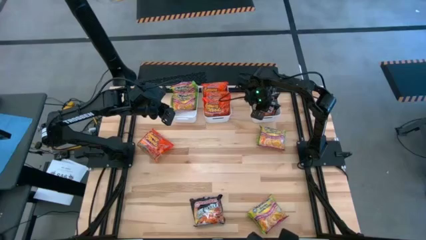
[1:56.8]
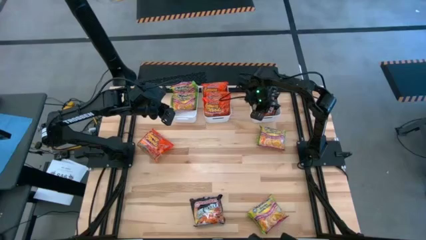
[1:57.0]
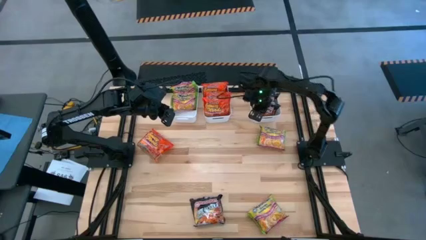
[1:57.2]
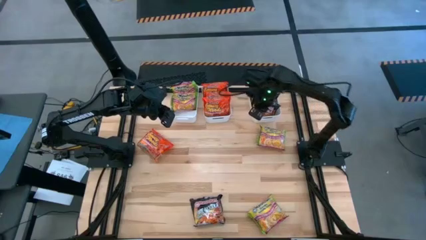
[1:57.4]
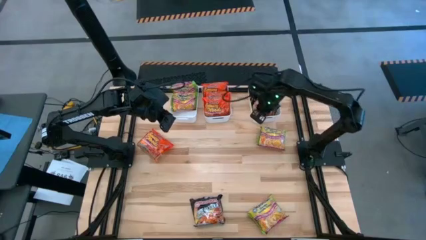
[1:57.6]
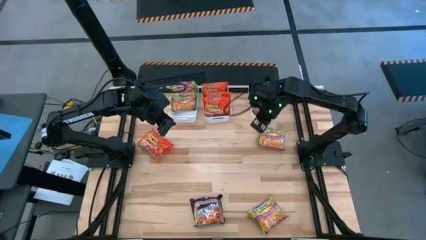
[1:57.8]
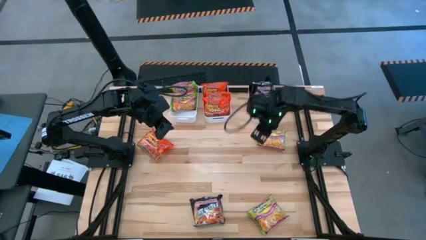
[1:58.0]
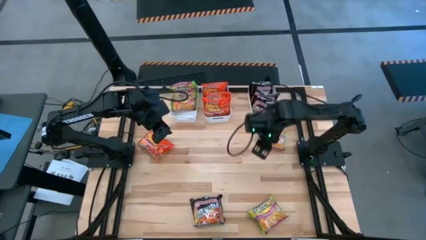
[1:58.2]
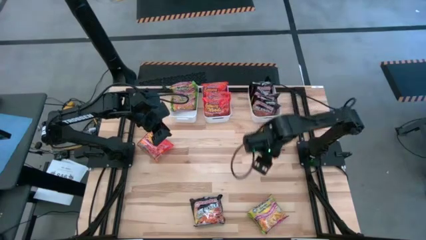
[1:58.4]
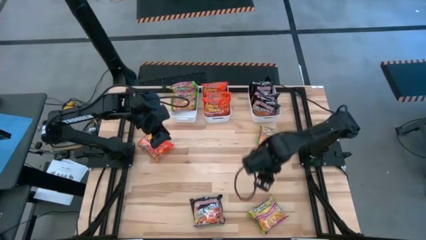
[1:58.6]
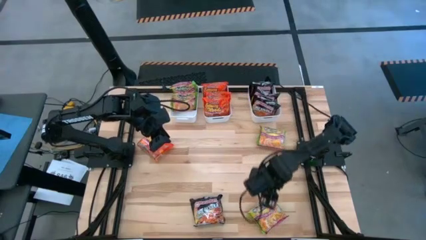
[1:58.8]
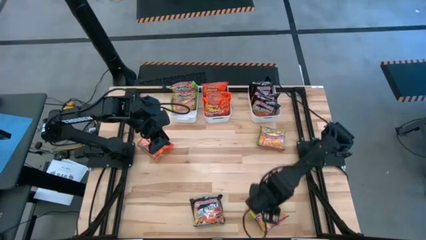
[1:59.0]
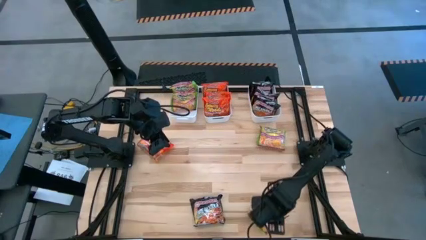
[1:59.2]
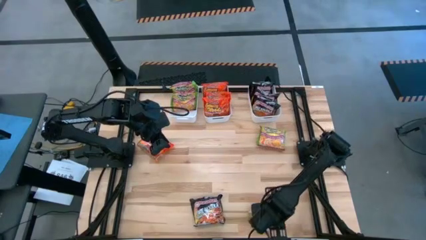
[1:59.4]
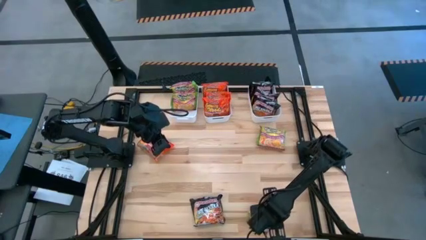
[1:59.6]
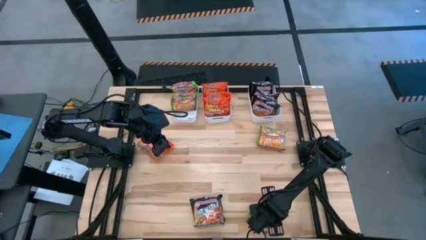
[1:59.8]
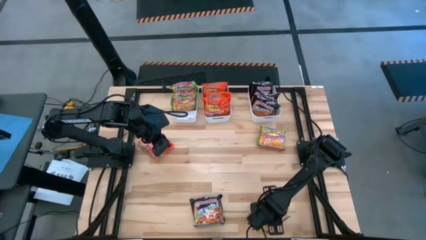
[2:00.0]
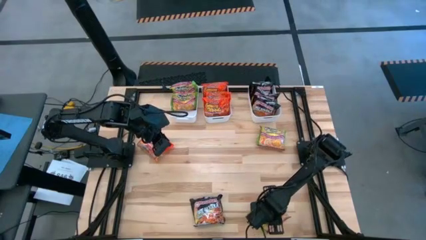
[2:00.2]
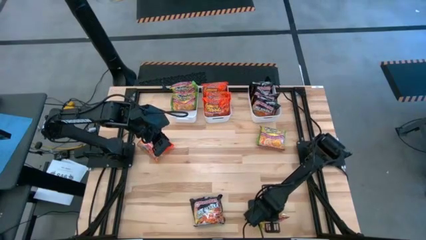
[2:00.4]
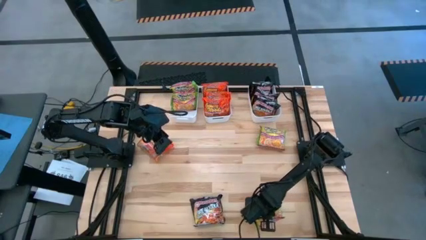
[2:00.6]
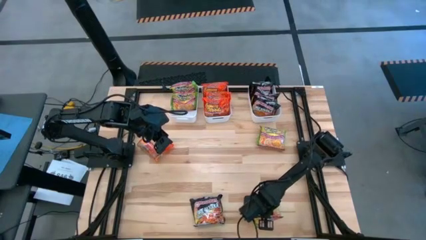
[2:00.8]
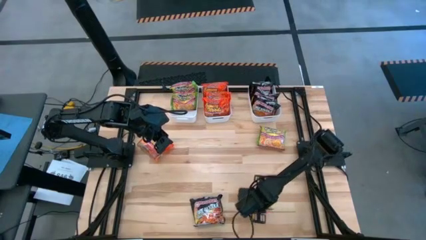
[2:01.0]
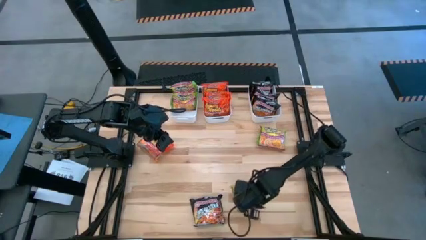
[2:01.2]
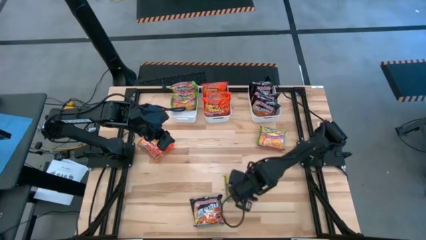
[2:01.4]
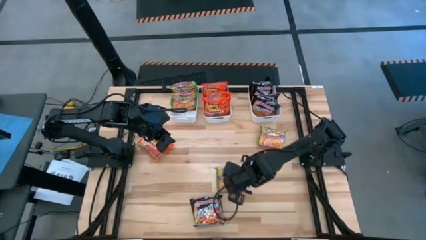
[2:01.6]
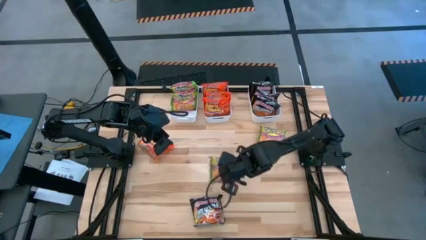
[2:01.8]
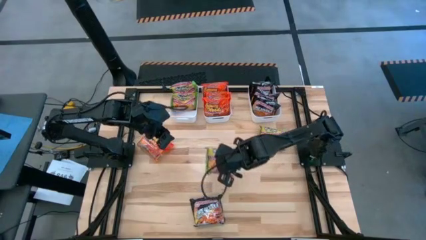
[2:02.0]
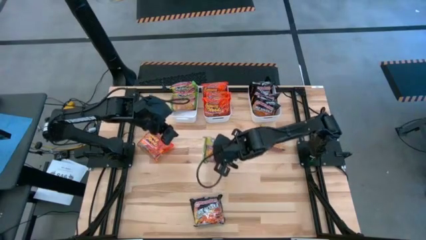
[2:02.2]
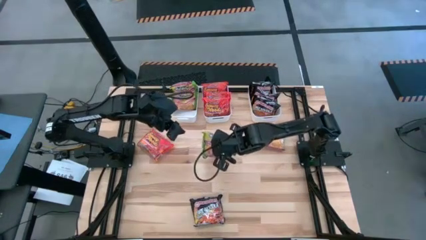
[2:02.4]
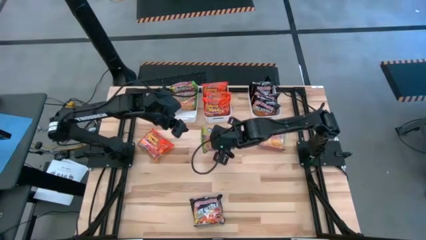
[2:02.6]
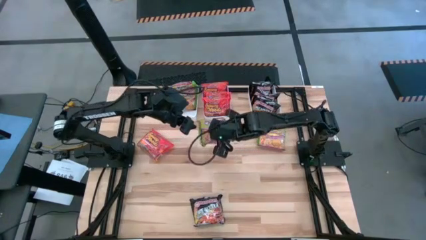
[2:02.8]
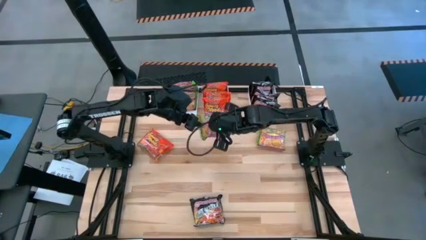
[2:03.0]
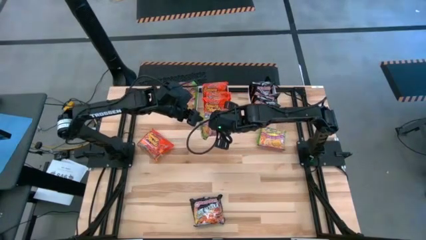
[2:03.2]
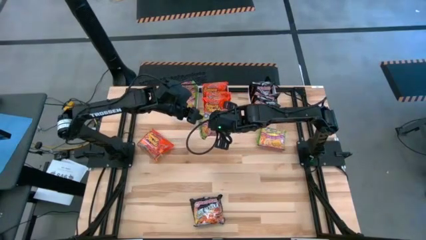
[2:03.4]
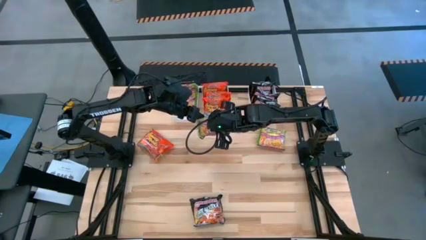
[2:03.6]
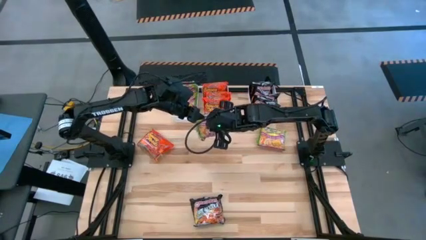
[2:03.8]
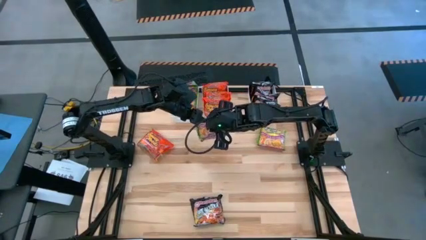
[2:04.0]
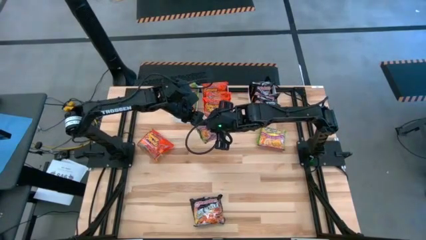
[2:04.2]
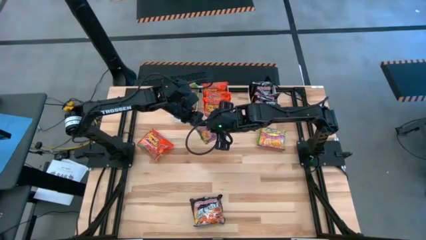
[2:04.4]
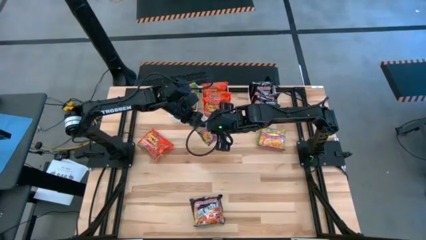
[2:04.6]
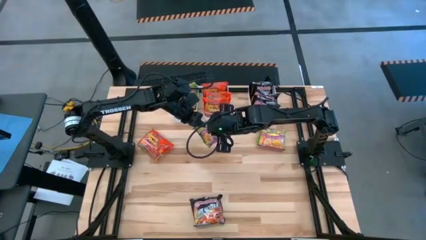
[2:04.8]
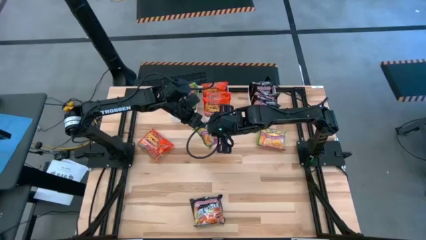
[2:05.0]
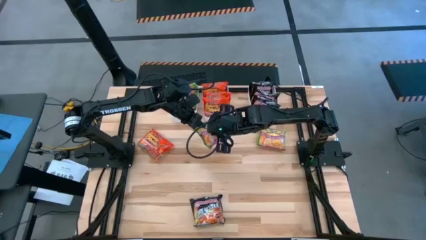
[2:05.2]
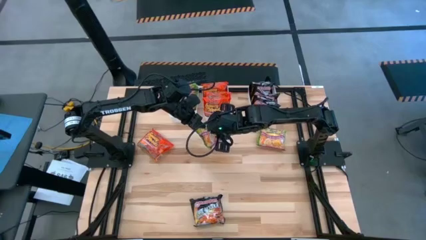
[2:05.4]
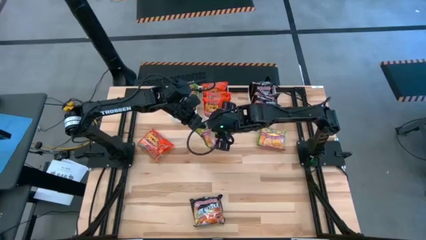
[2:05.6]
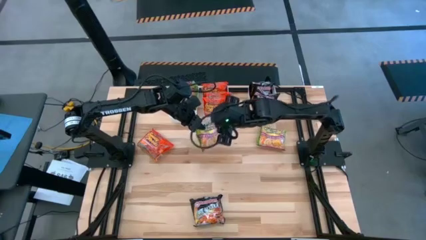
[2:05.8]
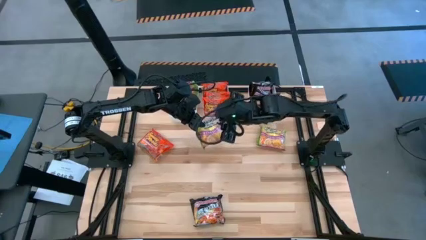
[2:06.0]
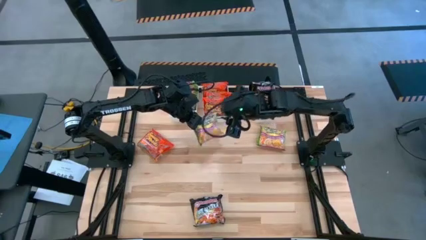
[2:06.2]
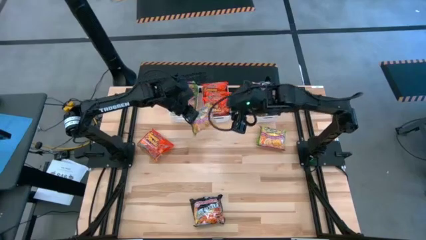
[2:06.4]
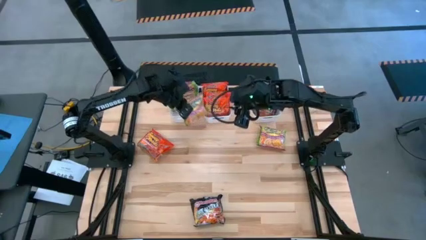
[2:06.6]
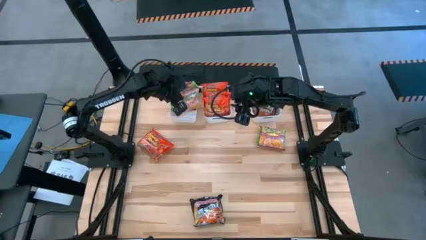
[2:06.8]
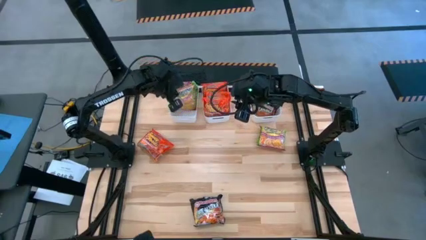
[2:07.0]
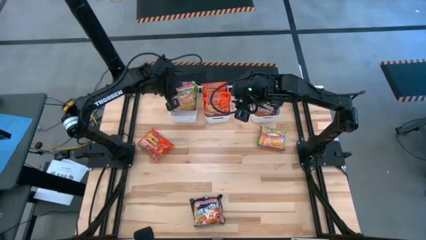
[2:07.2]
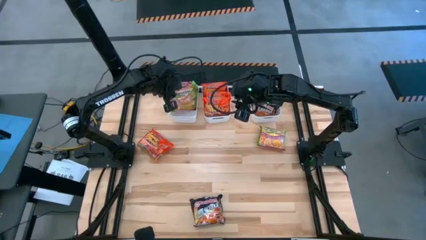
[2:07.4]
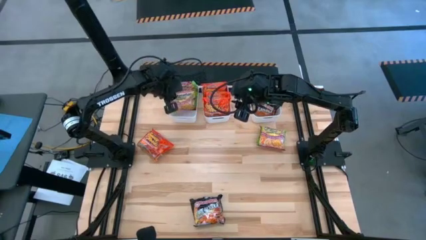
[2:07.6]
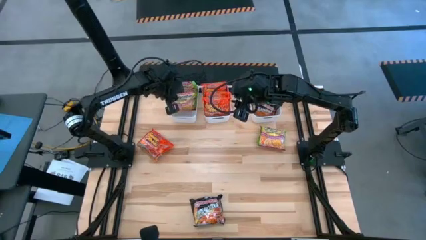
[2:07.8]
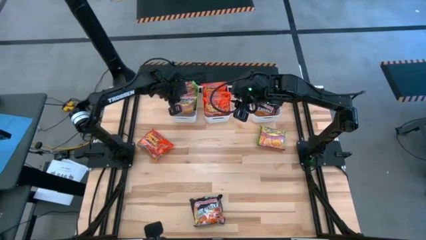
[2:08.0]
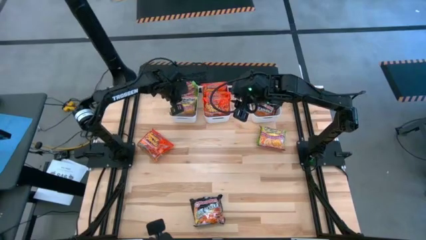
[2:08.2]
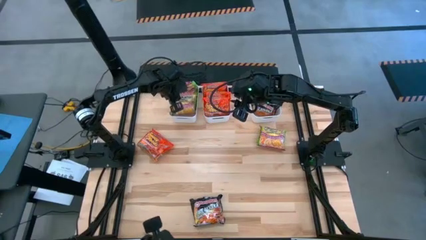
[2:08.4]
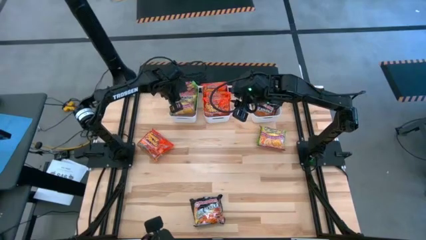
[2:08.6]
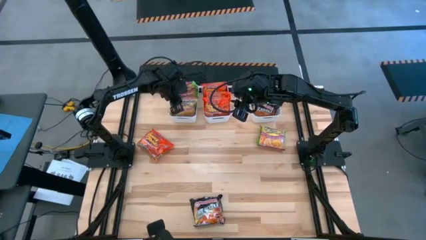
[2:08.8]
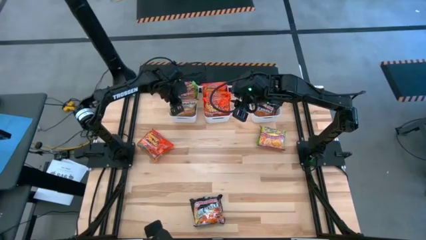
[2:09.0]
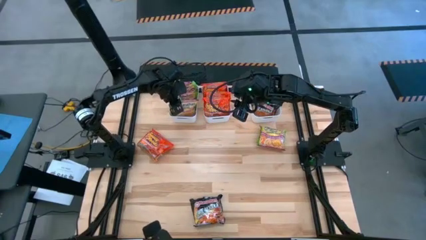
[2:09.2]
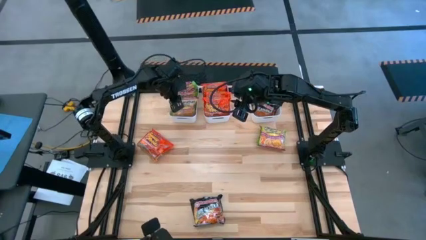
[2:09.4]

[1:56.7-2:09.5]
Task: Sort Maruchan noodles
Put the green noodle pack into the left white bin

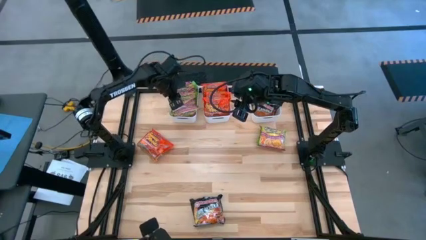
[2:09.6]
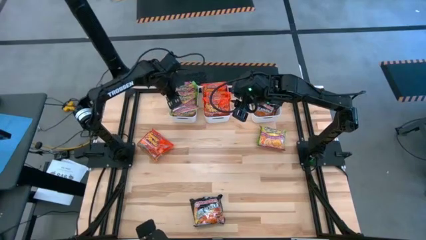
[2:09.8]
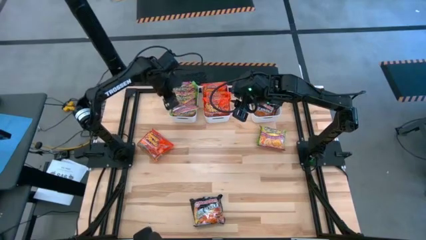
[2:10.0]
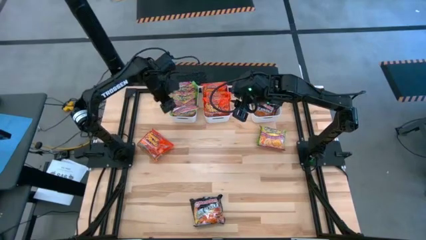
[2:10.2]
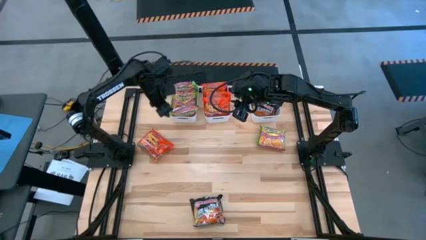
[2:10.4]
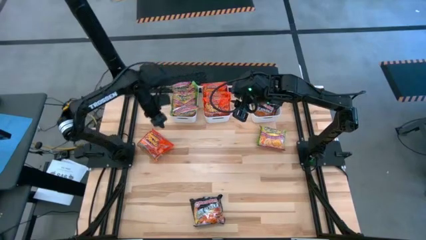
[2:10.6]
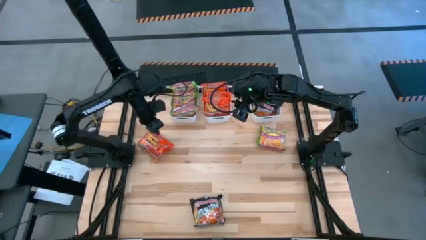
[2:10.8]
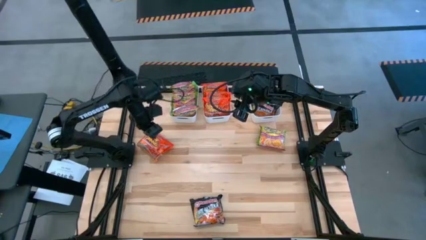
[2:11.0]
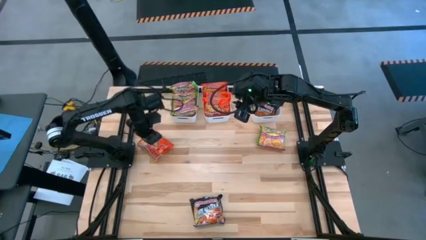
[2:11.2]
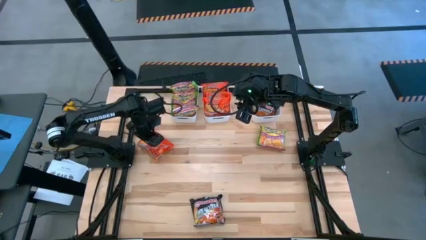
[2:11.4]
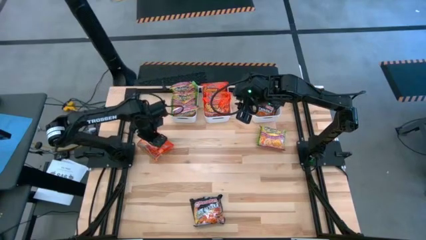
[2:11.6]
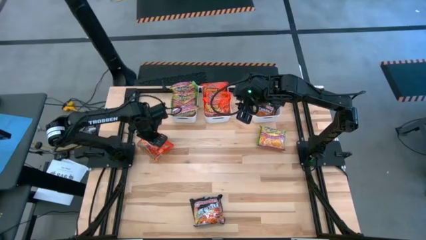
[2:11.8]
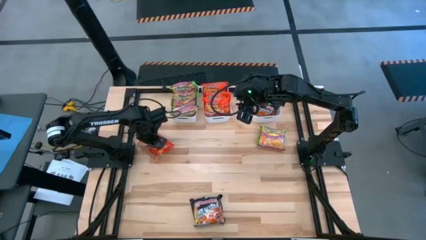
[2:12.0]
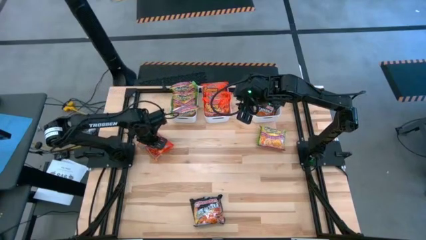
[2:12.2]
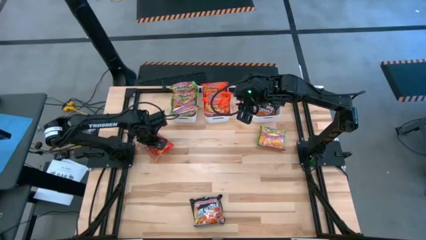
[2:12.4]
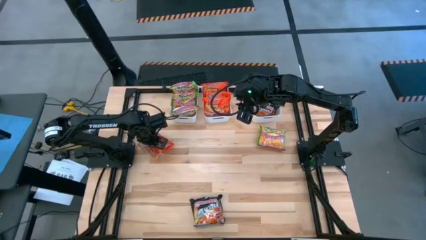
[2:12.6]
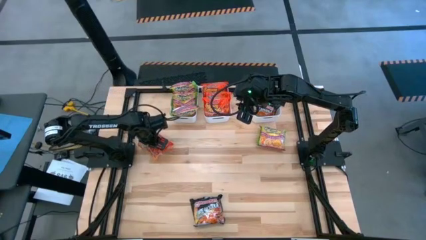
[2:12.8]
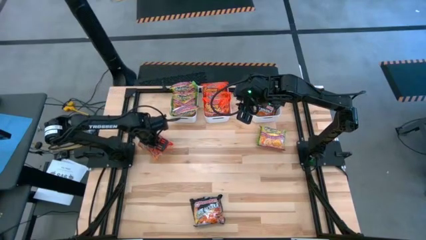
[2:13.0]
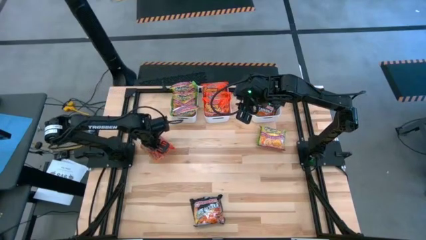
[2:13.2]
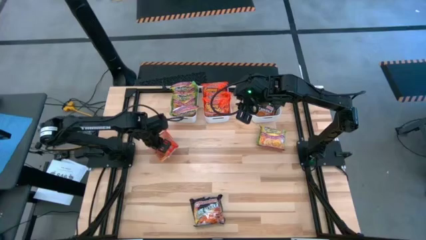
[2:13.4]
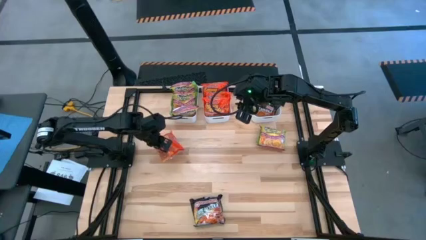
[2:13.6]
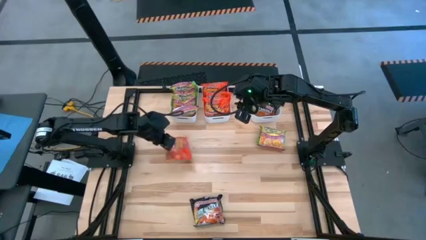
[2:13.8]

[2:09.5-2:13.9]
Put the orange noodle pack into the middle white bin

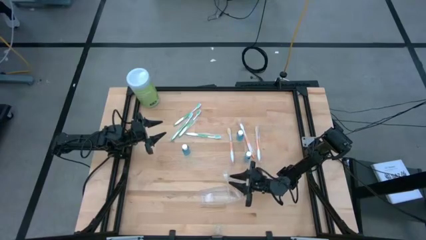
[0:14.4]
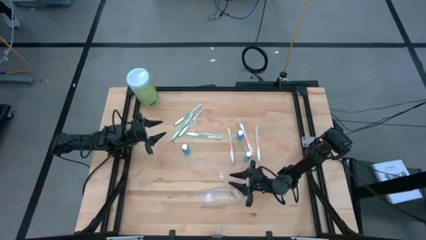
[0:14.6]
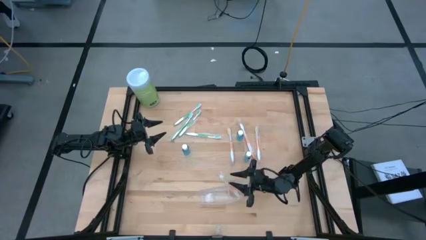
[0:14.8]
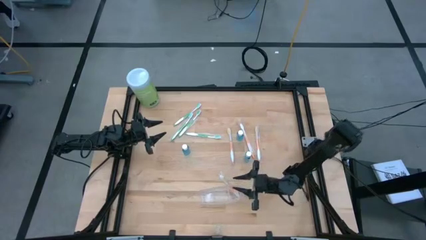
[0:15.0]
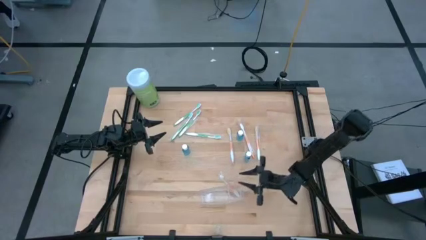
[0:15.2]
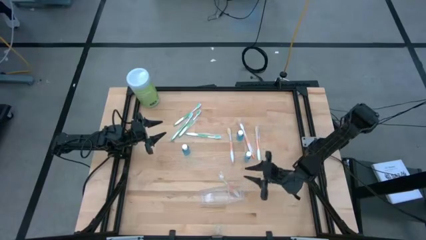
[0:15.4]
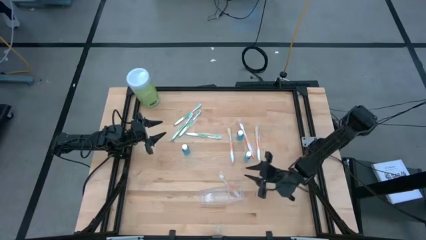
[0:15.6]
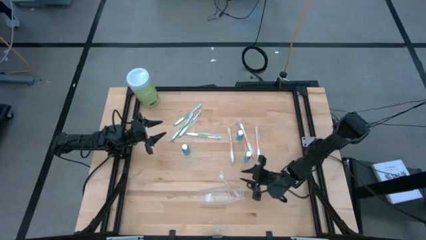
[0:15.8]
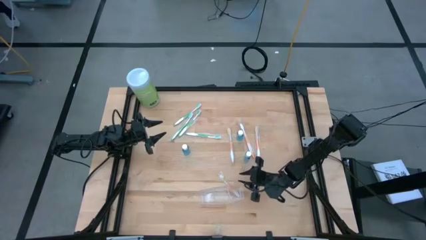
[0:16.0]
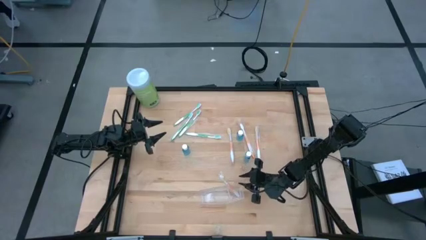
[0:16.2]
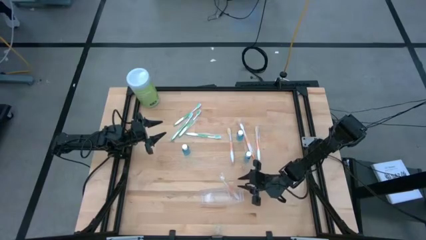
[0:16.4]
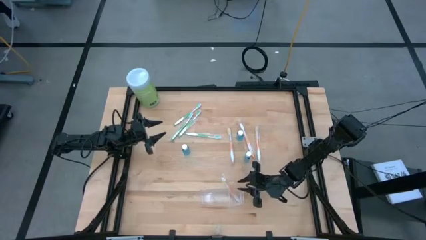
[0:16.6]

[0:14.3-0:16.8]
Task: Pick & Place toothbrushing station
Adjust the transparent organizer
